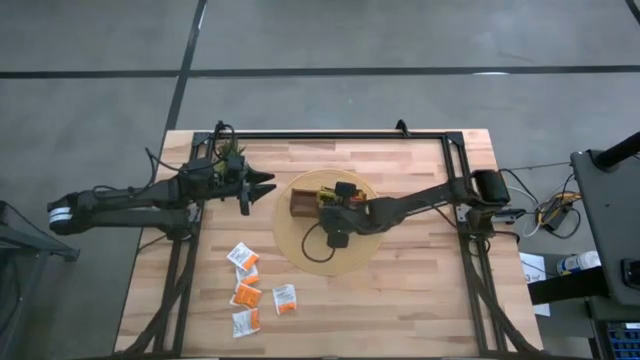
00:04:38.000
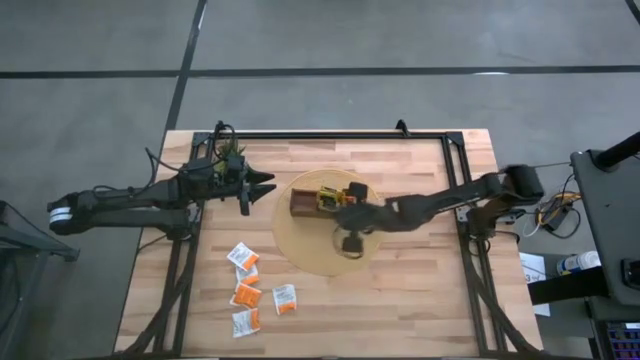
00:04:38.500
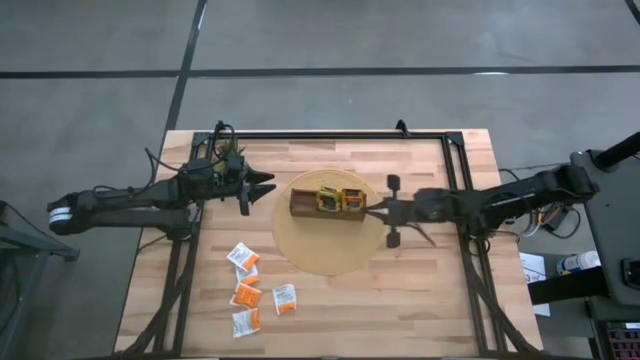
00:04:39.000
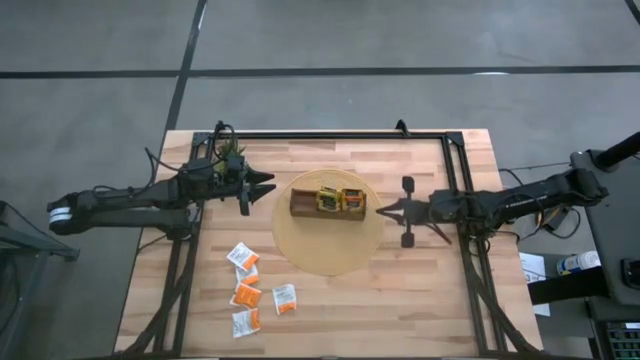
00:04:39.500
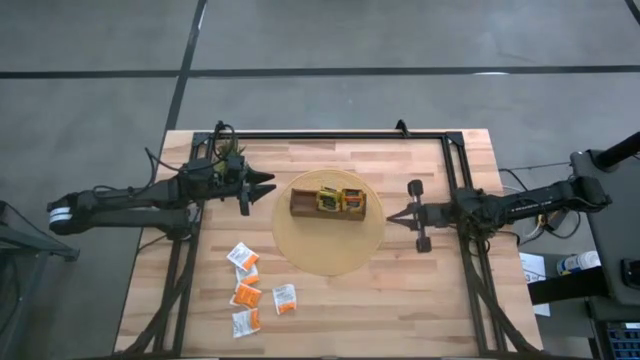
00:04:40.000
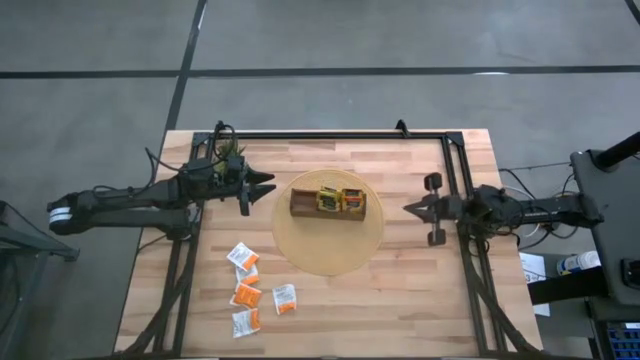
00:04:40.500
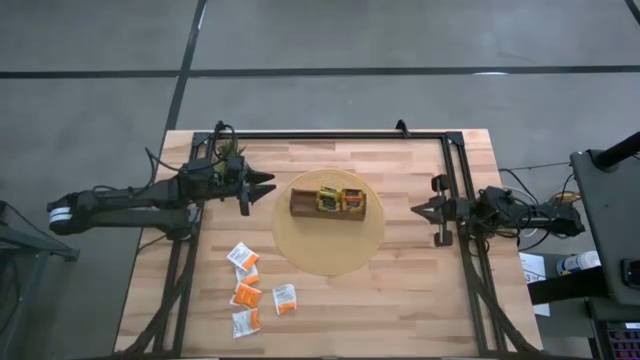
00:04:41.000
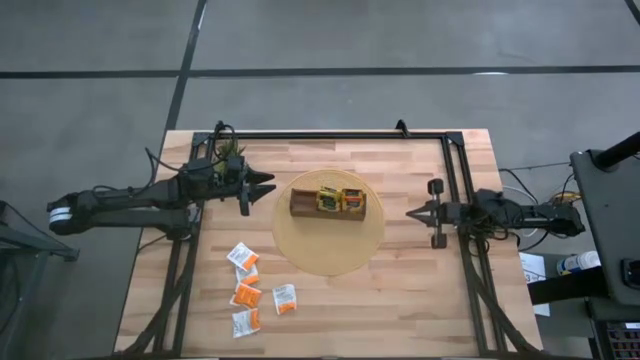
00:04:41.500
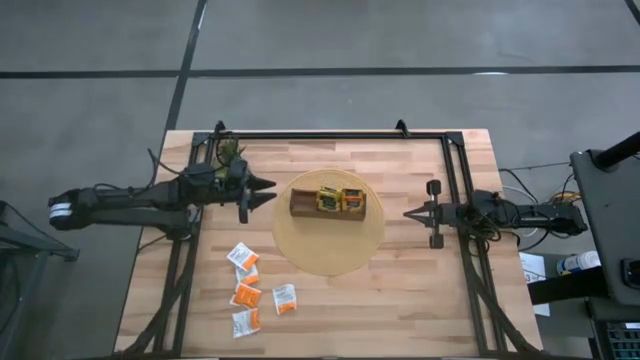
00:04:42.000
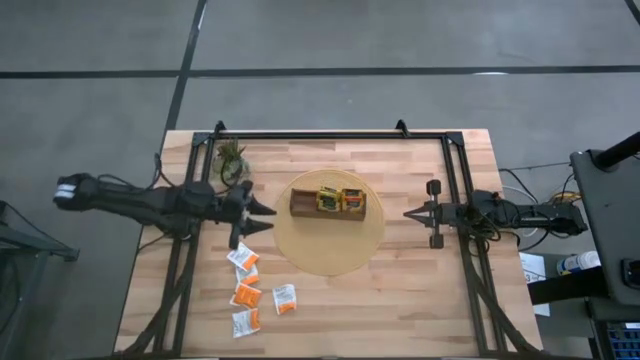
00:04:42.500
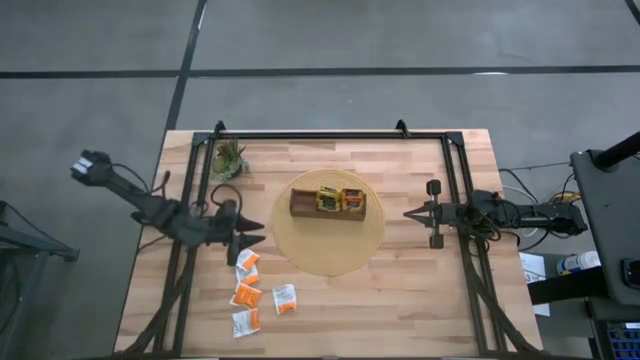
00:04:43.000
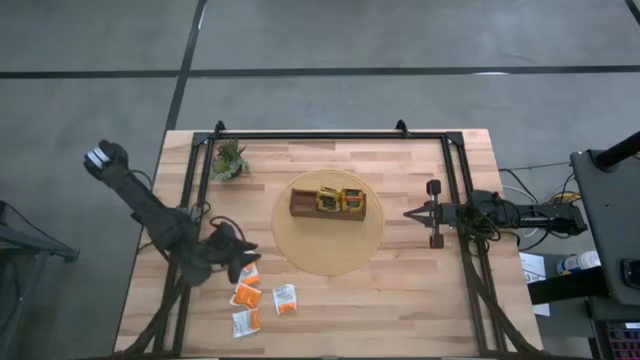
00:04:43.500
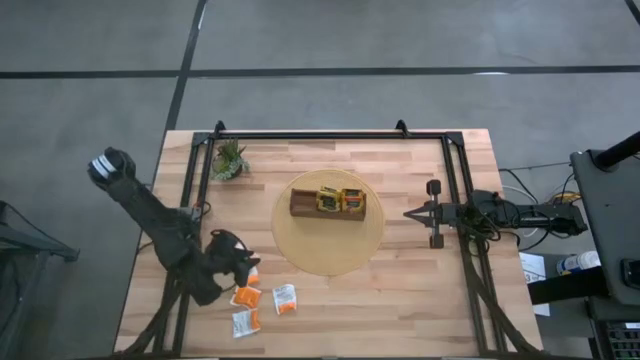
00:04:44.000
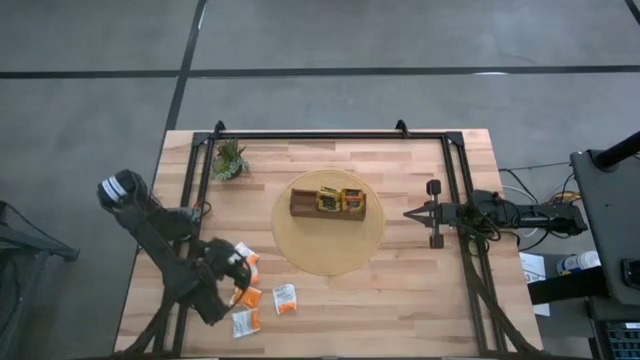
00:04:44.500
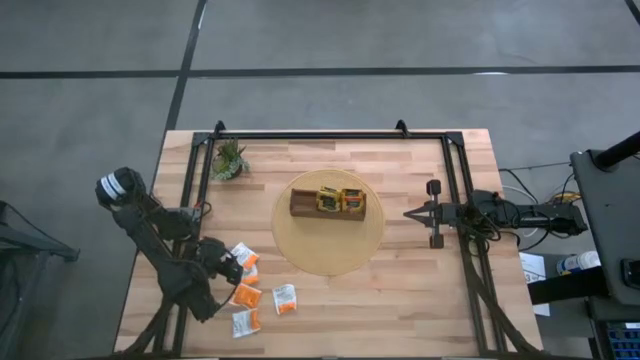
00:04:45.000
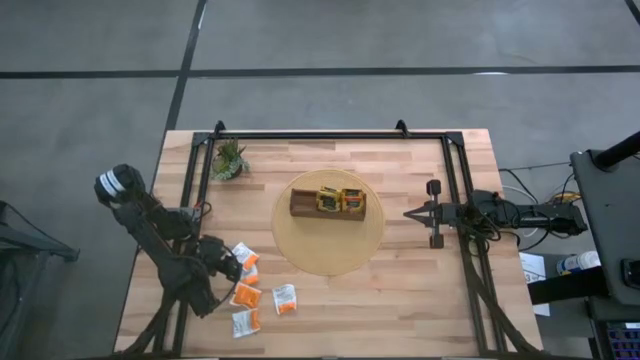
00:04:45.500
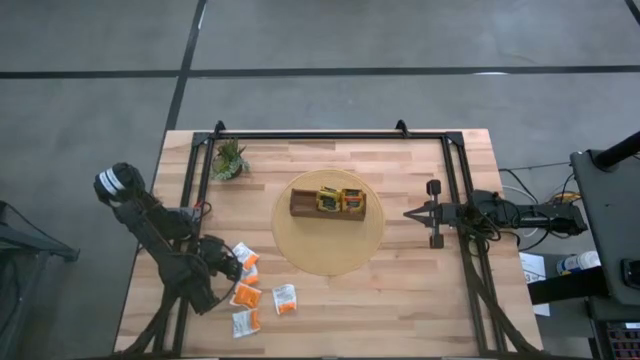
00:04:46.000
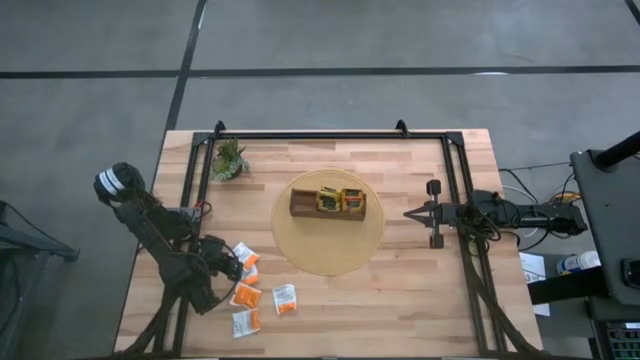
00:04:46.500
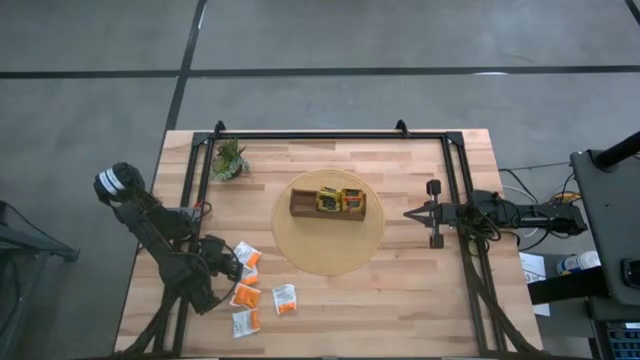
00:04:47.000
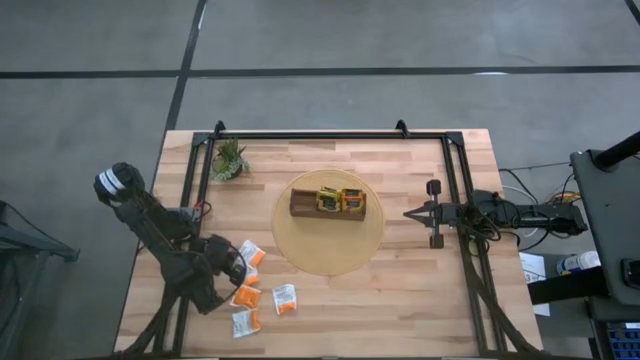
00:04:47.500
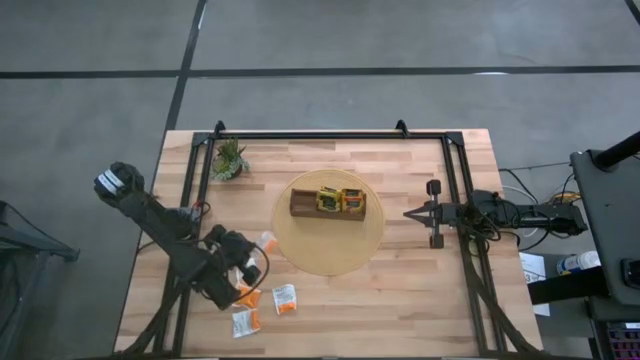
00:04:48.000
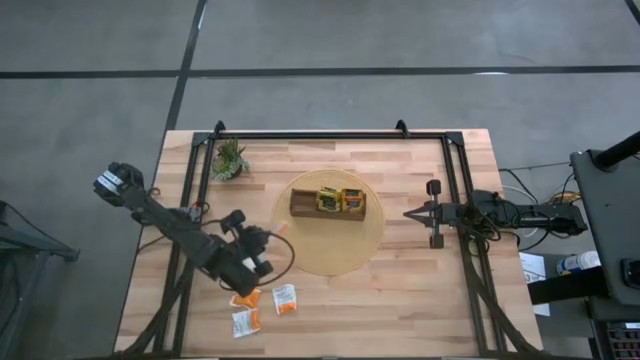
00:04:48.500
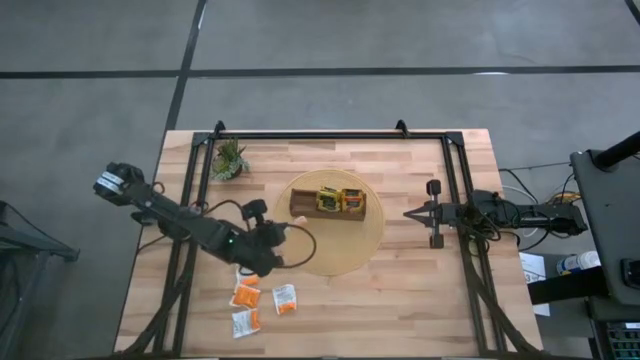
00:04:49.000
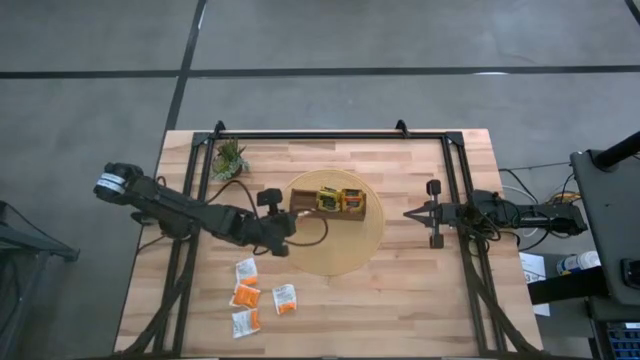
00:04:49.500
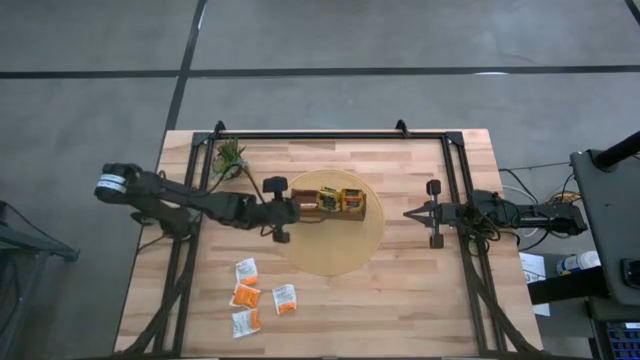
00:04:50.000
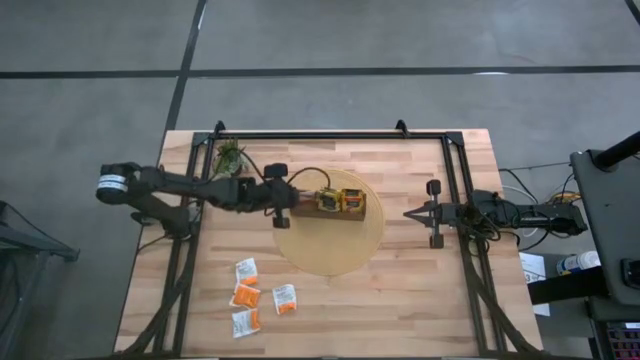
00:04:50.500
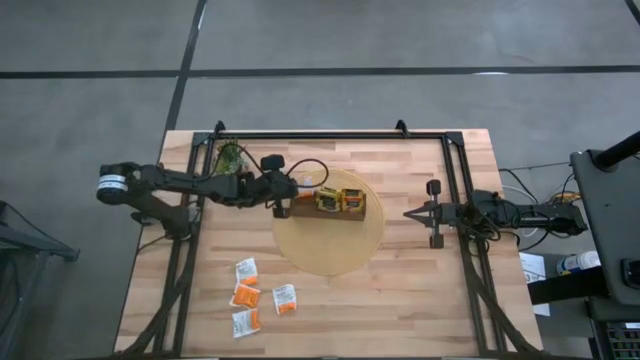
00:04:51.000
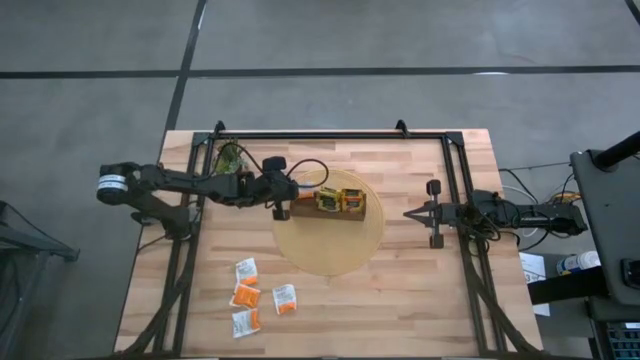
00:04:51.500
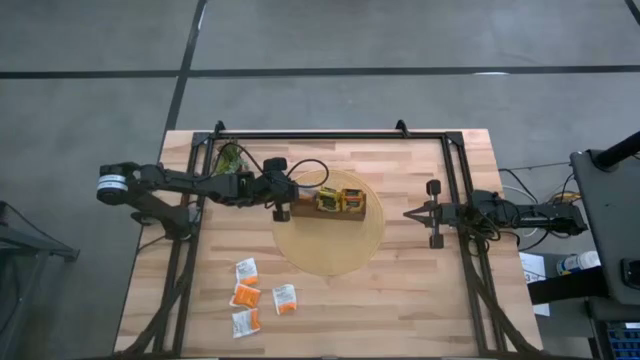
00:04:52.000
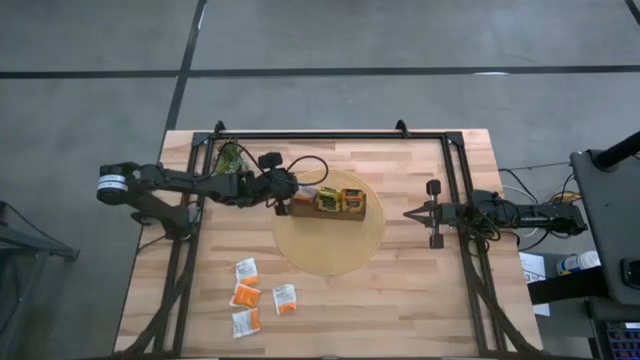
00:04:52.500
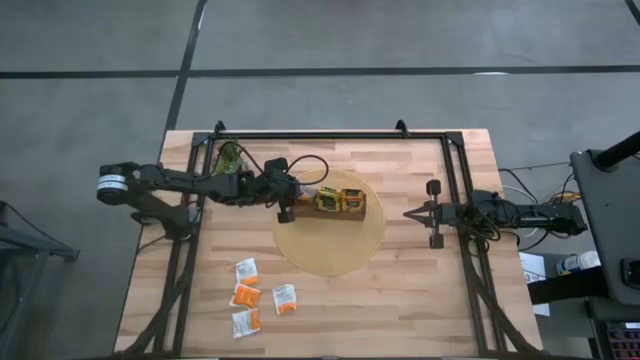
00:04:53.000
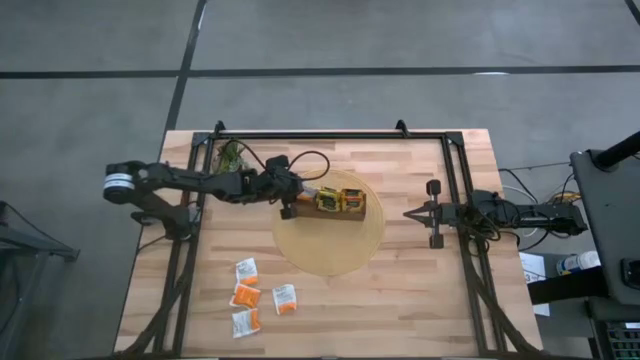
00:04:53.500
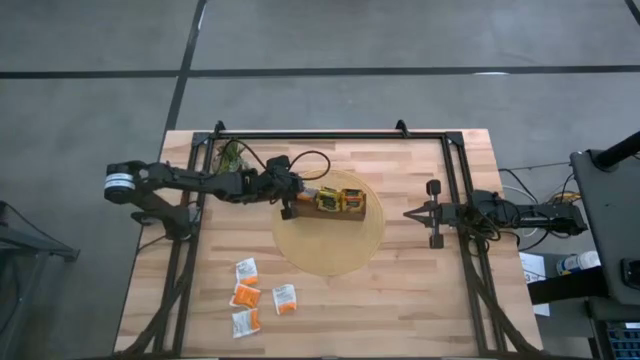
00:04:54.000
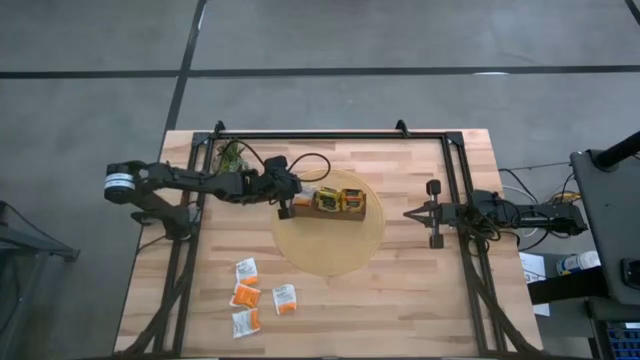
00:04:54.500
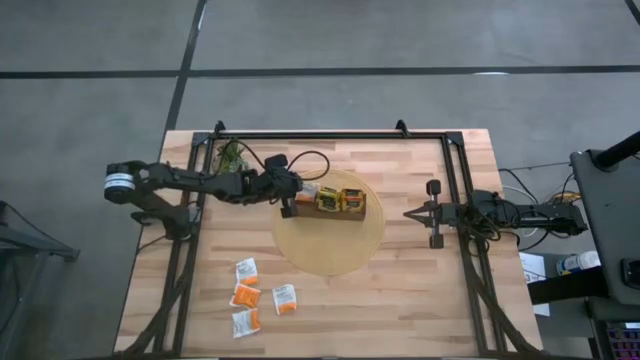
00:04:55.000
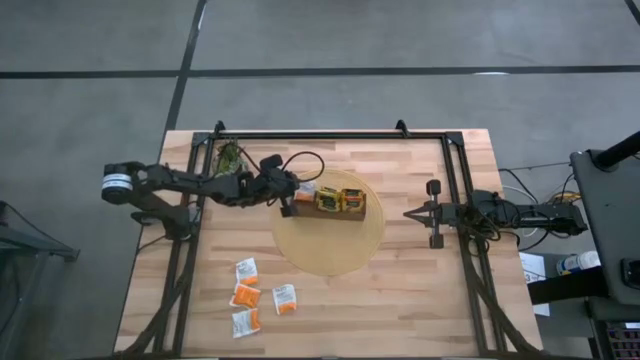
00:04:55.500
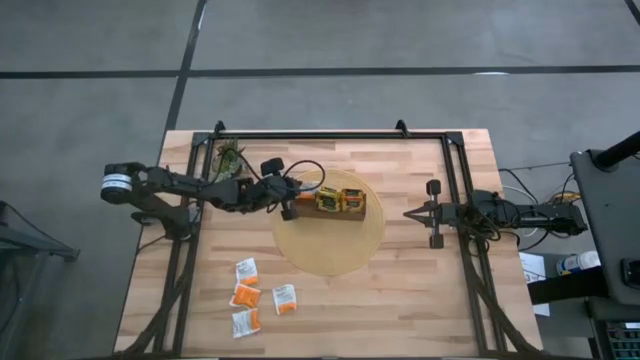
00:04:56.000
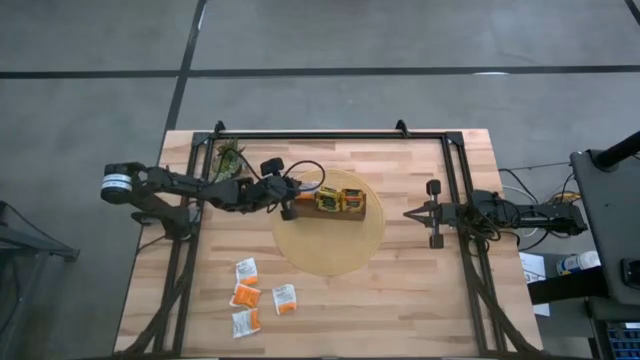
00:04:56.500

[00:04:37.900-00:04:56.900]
Task: Pick & Place Tea
Put the white tea bag into the left section of the wooden organizer

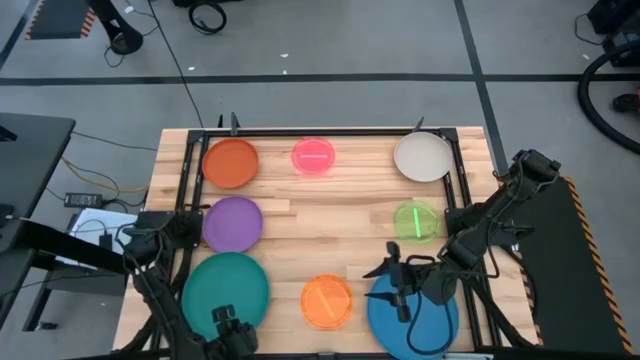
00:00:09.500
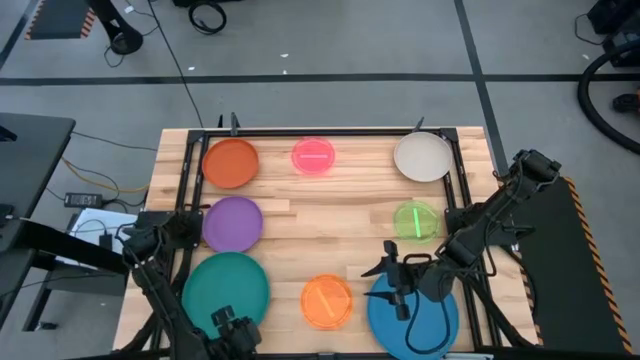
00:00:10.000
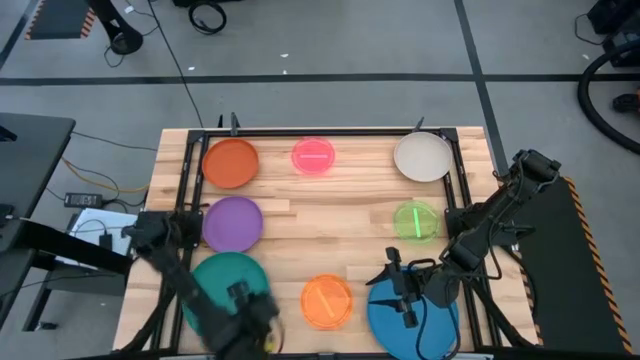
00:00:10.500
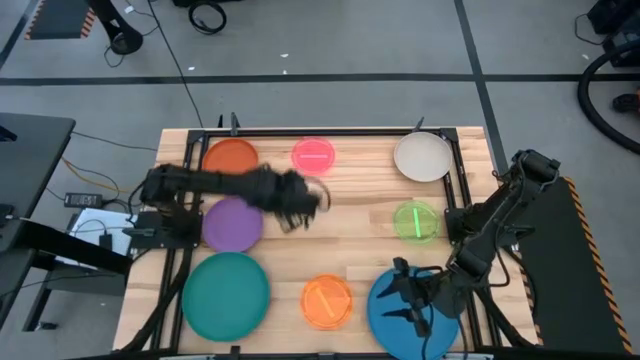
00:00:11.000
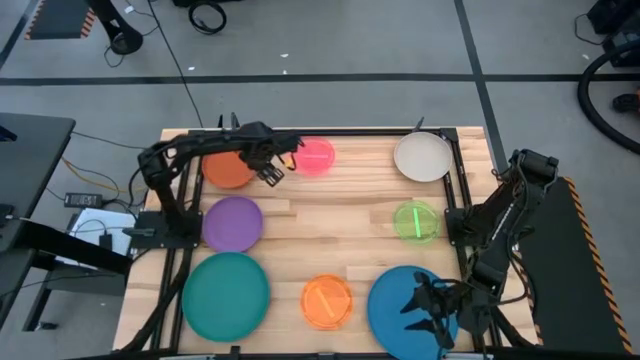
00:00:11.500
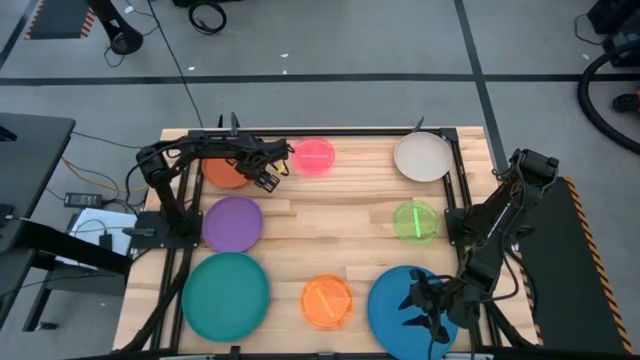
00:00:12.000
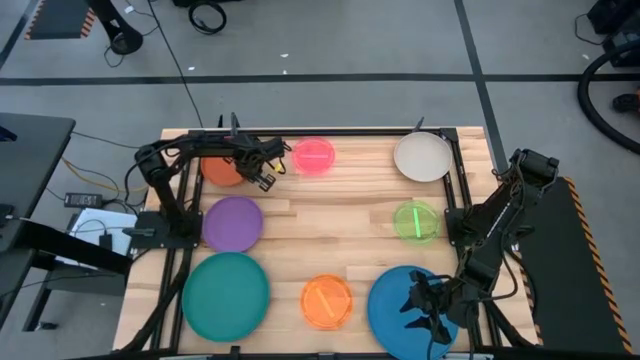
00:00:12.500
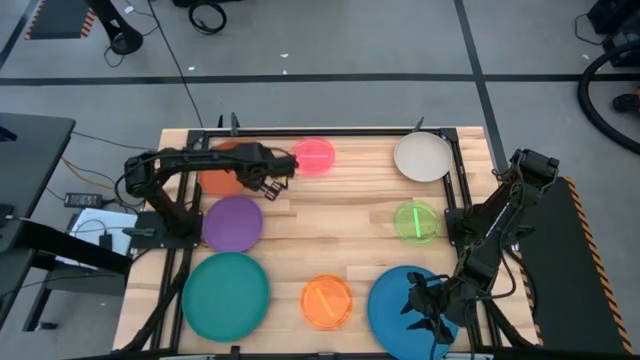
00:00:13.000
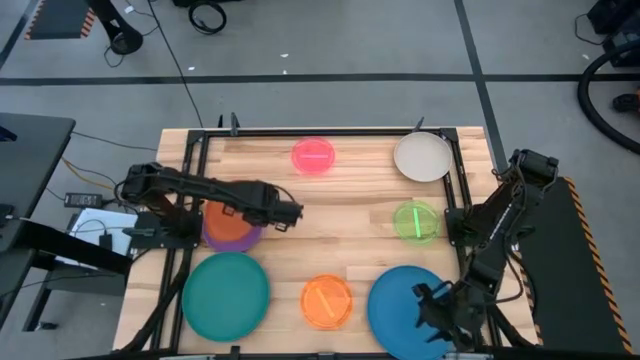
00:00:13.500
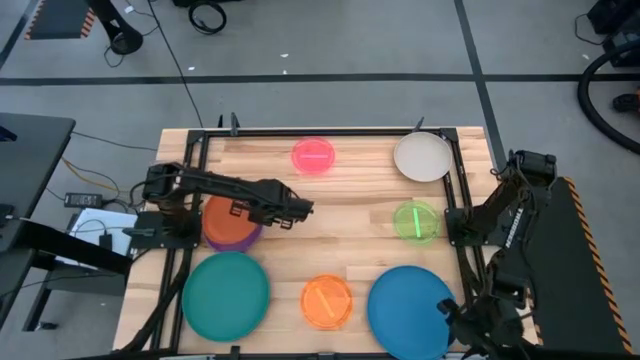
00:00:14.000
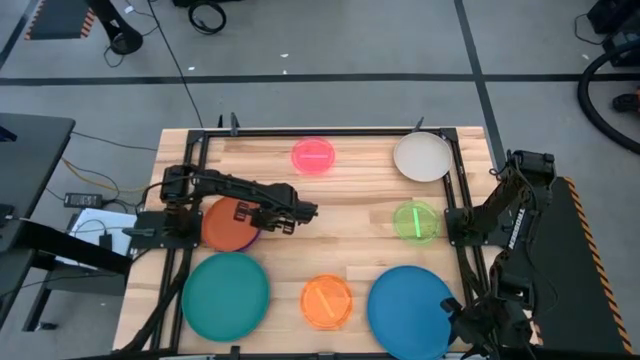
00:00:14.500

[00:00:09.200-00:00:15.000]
Task: Stack plastic plates
Stack the orange plate on top of the purple plate
